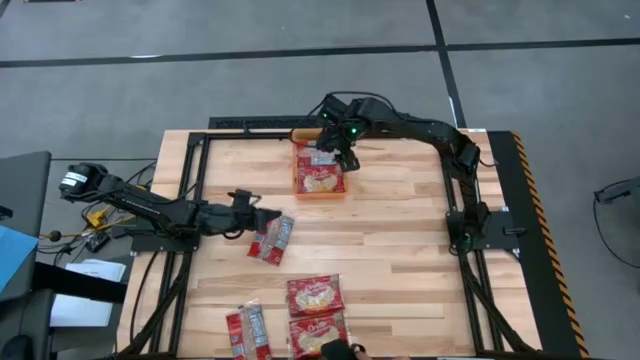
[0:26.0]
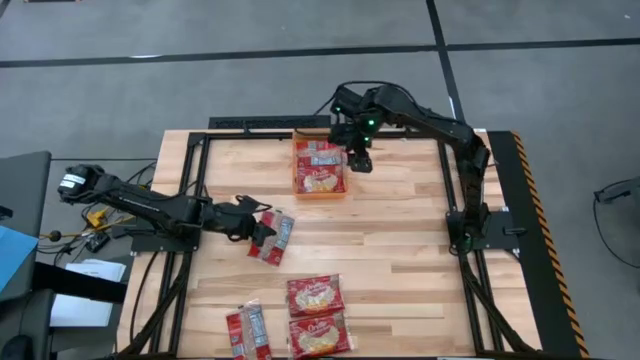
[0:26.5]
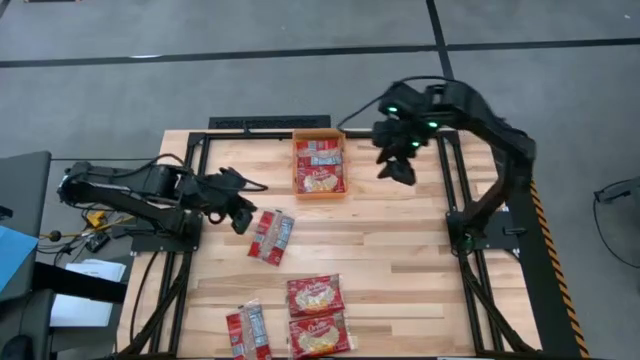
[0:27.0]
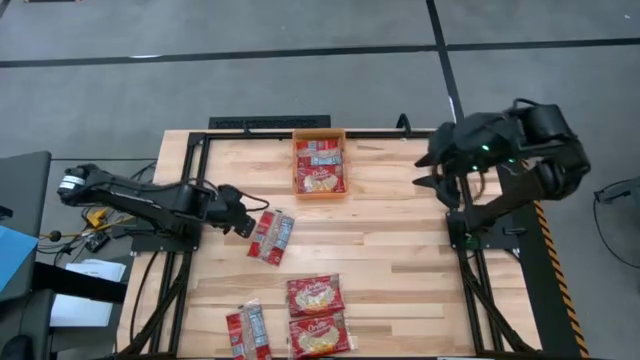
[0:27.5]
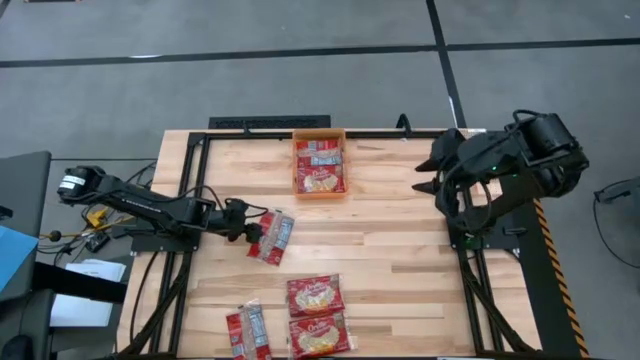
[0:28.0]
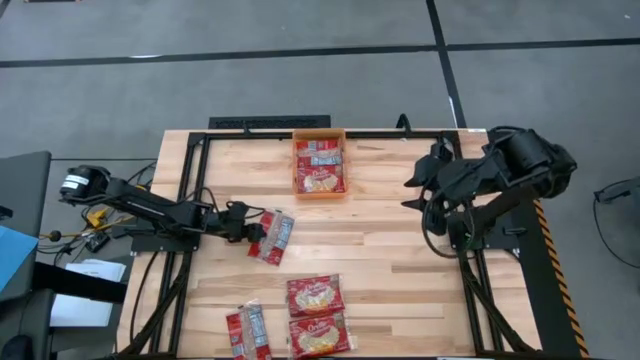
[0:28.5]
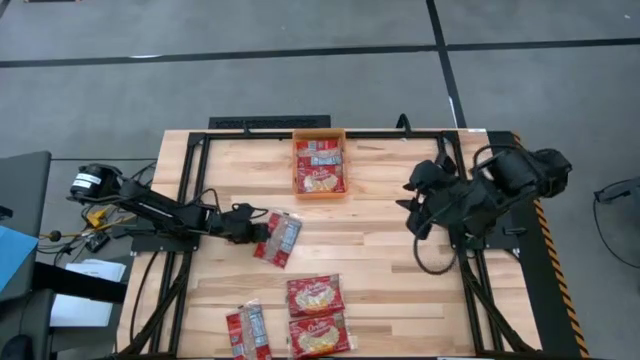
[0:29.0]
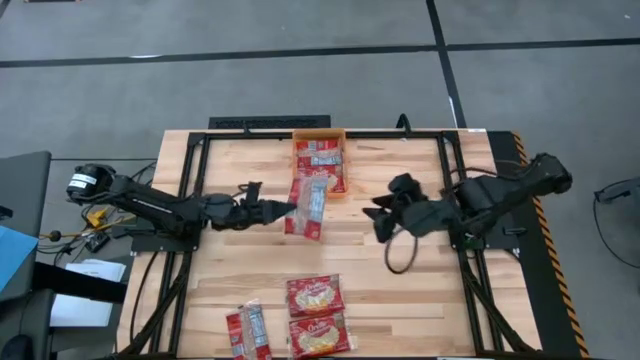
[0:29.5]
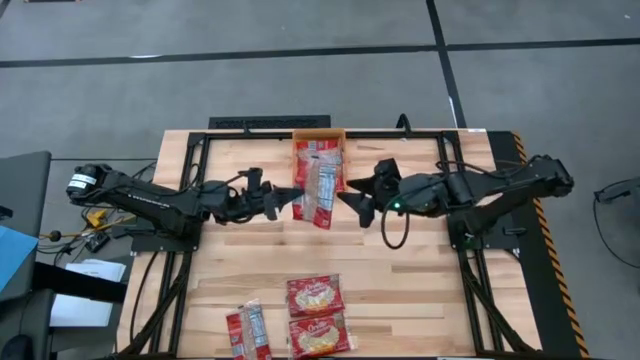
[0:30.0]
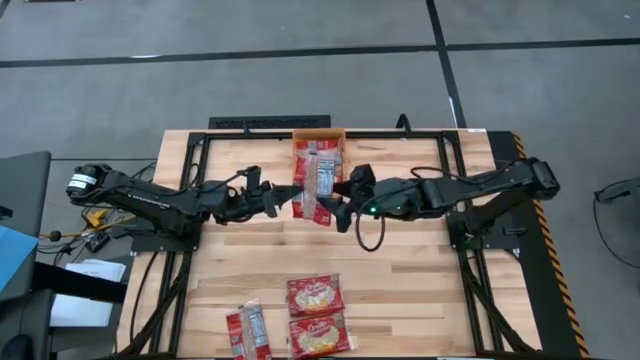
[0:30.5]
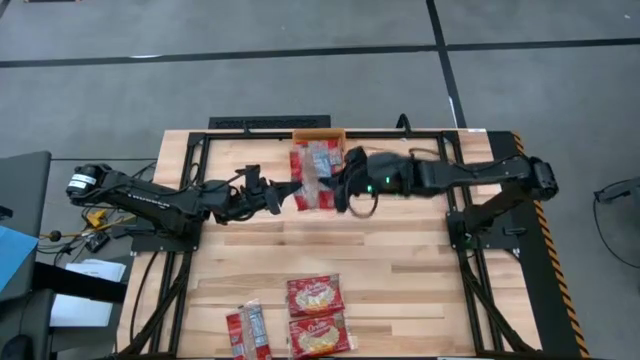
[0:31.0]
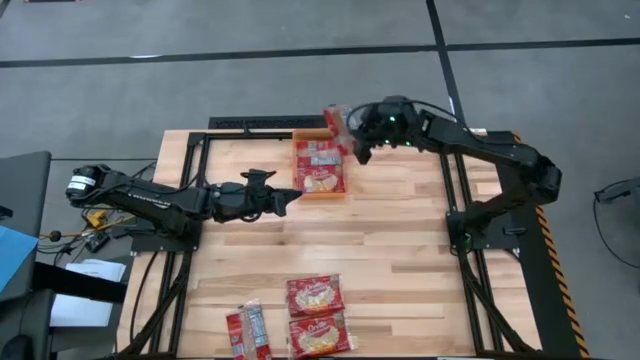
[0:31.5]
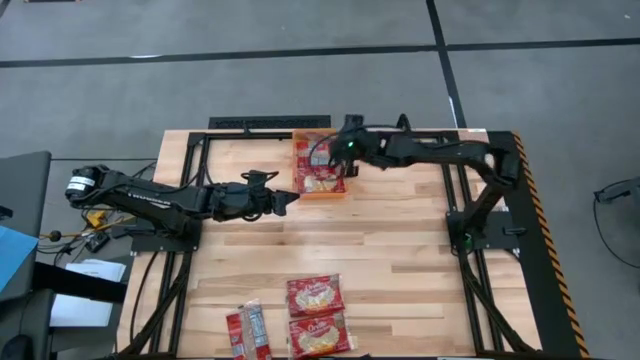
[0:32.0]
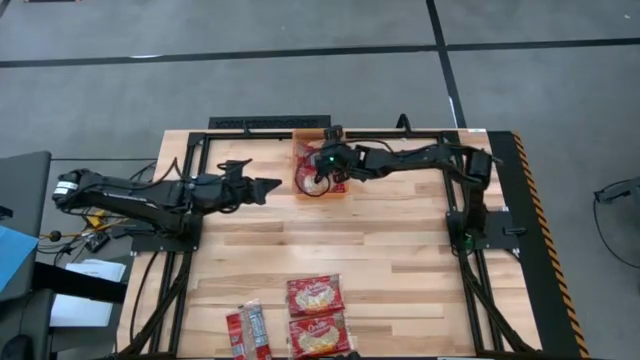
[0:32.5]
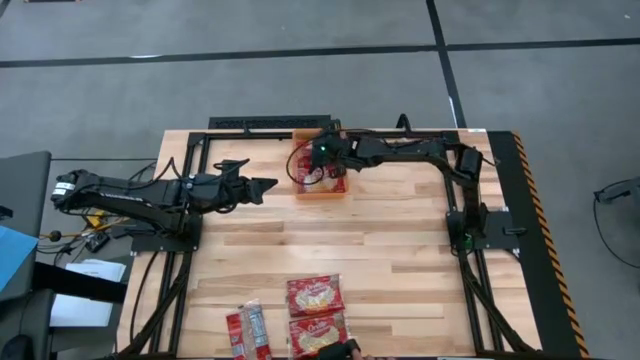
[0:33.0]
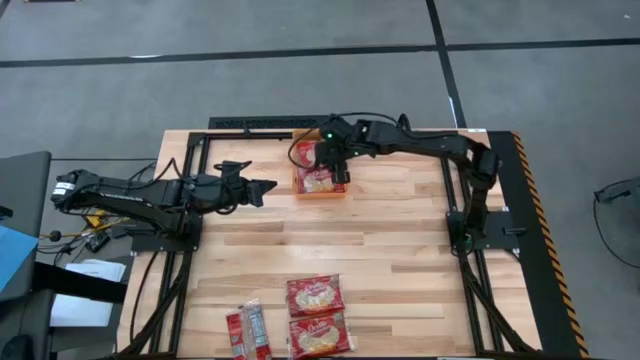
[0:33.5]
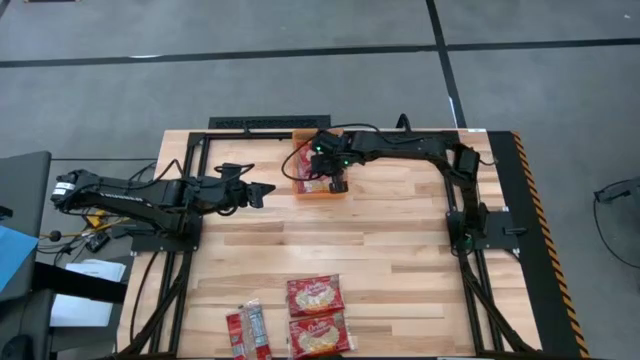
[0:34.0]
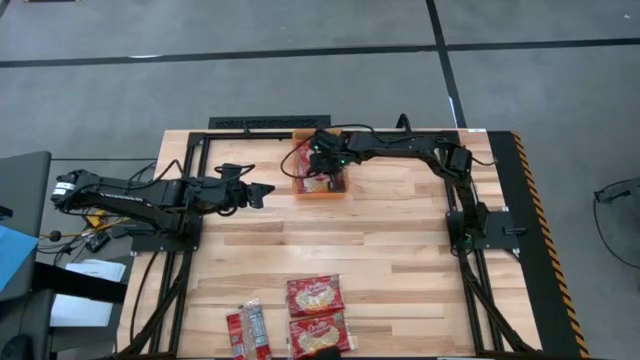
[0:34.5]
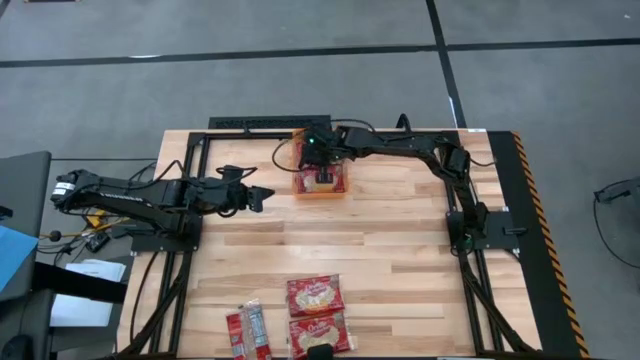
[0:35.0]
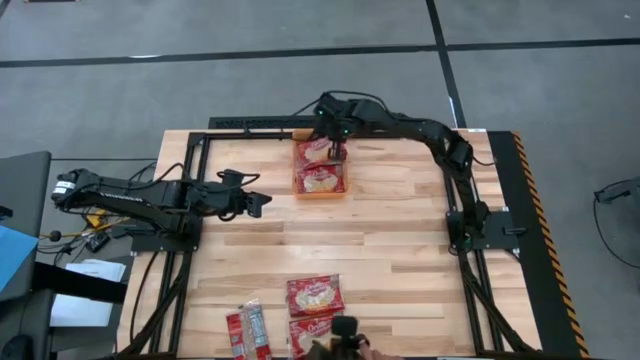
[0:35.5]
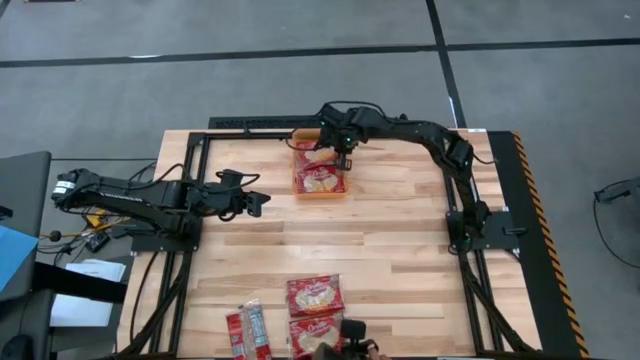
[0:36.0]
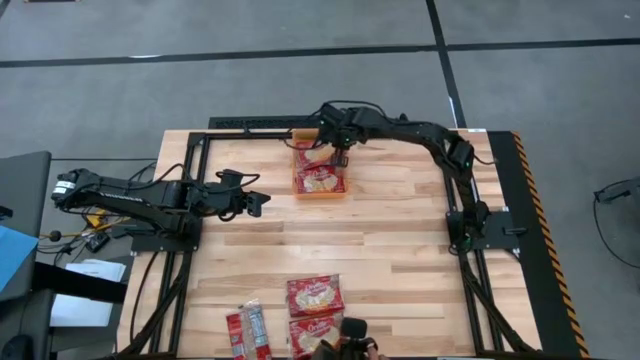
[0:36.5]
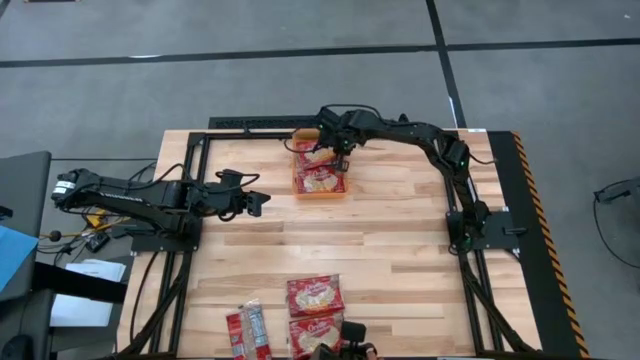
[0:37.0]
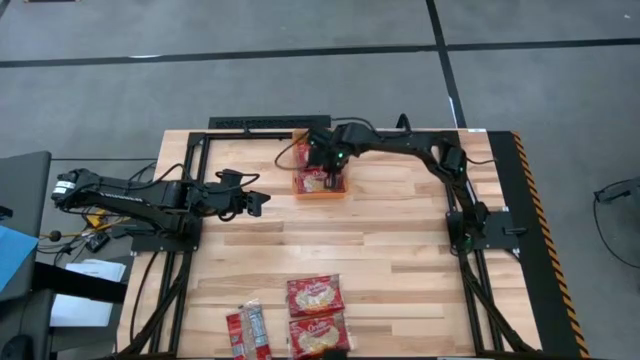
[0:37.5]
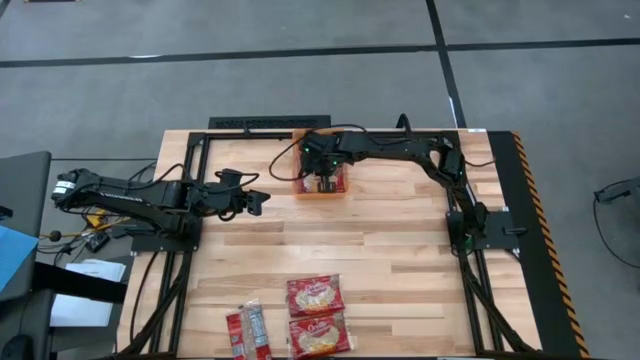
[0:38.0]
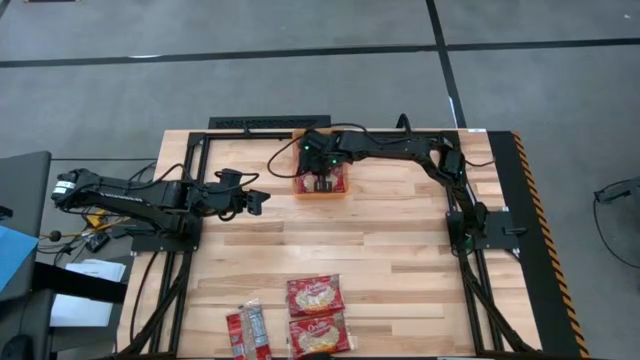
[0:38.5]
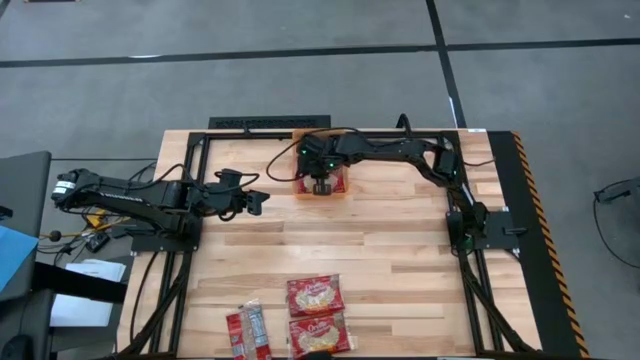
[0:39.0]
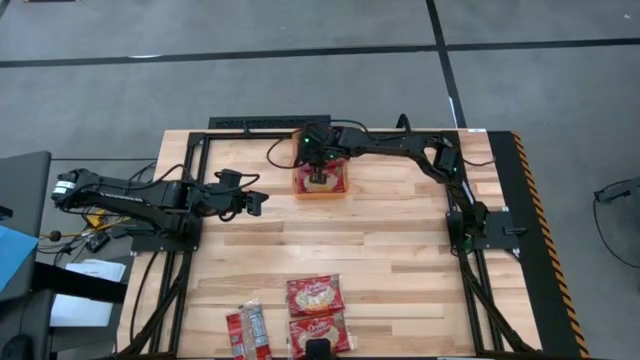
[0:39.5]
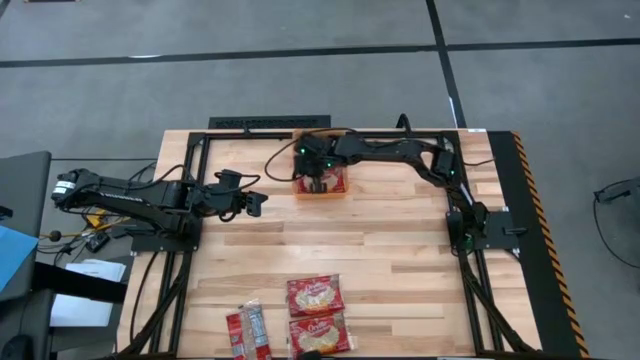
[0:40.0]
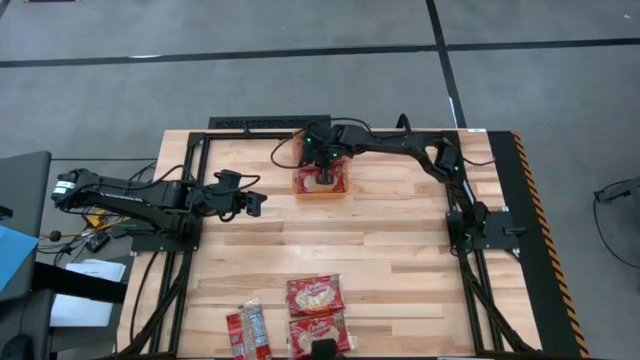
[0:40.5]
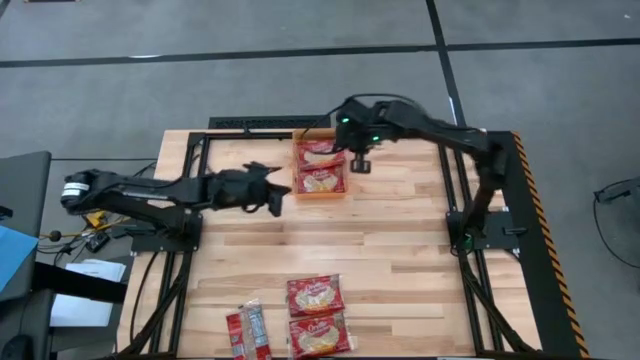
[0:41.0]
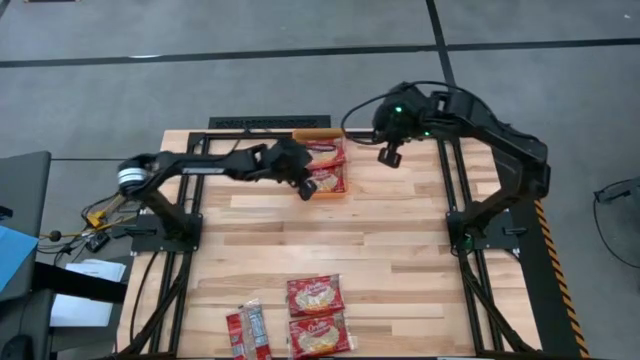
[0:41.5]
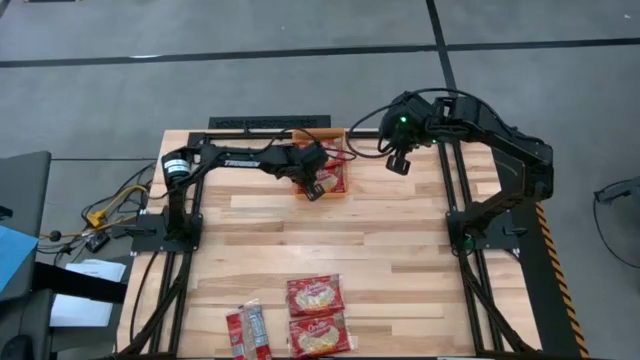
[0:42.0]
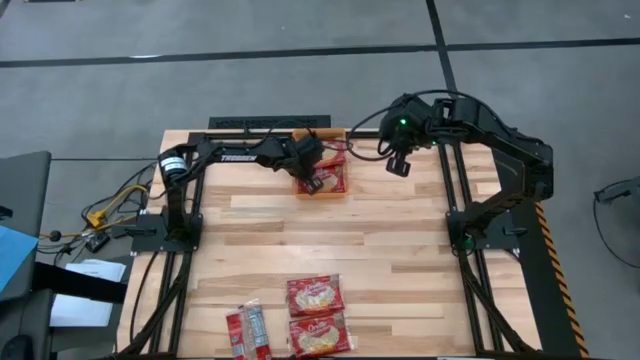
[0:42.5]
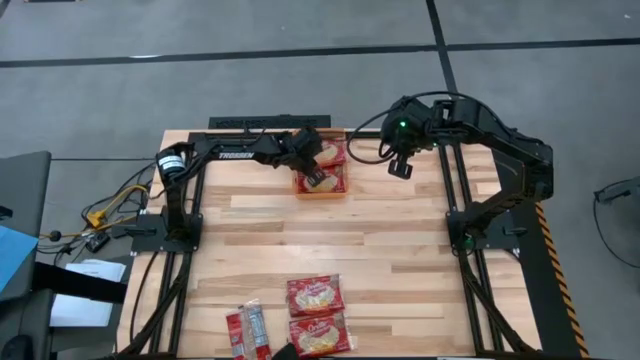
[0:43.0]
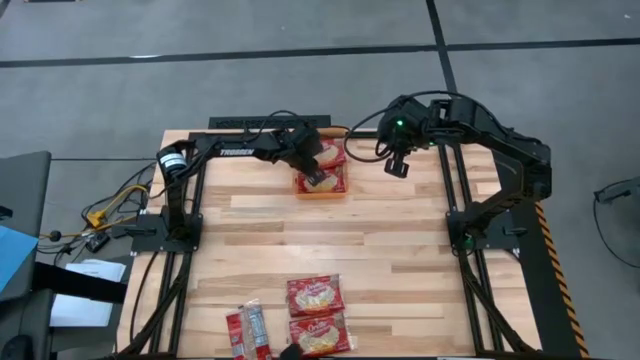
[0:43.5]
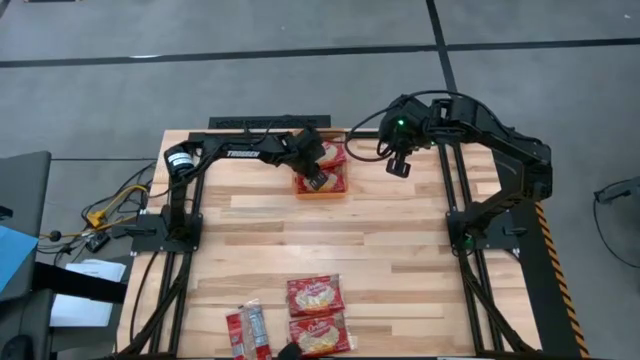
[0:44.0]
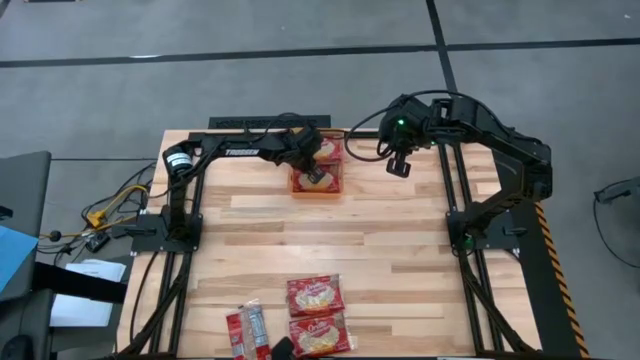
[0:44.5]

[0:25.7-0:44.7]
Task: Sort popcorn bags into baskets
Put the red popcorn bag into the orange bin

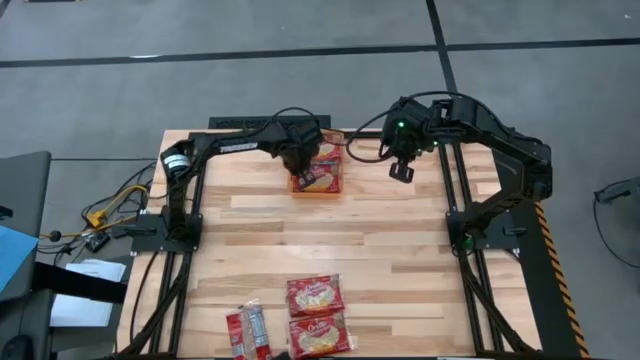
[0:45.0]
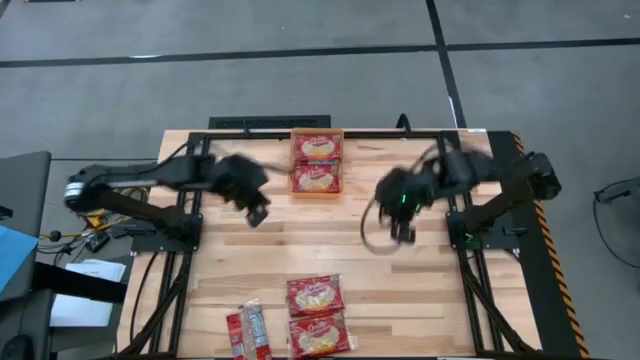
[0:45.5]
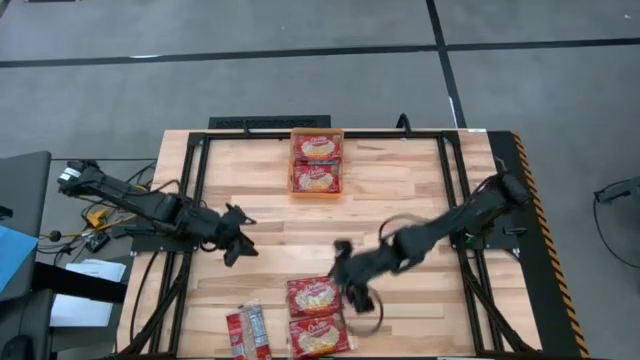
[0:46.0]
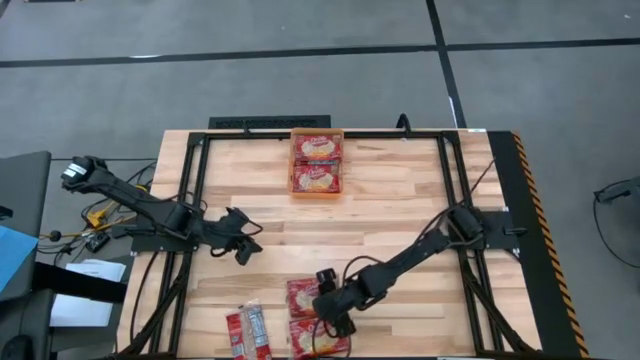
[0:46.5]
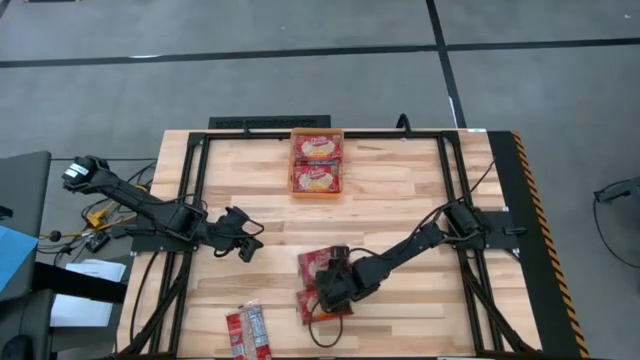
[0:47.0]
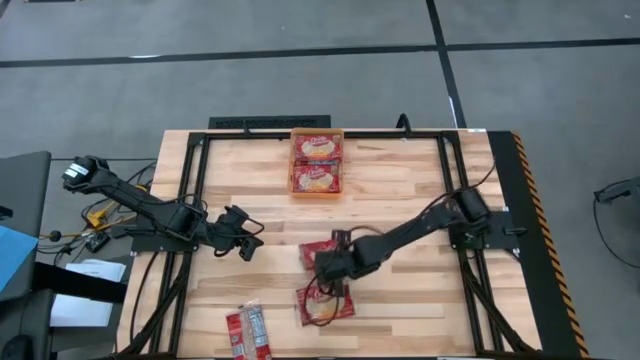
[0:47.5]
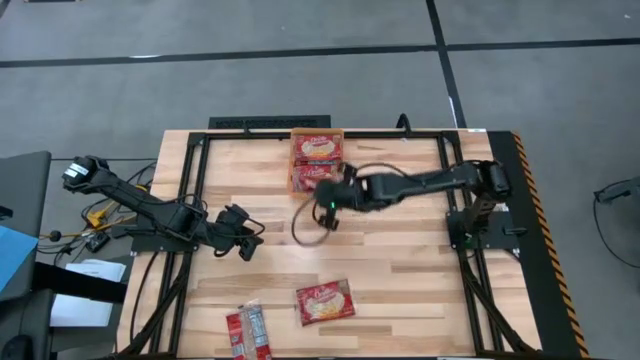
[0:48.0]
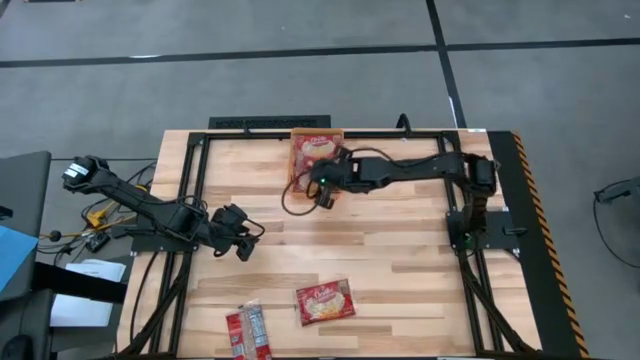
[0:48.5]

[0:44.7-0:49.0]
Put the red popcorn bag into the orange bin
